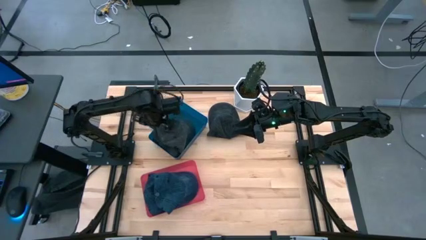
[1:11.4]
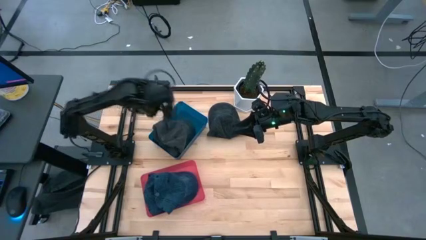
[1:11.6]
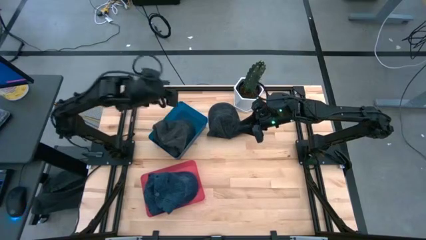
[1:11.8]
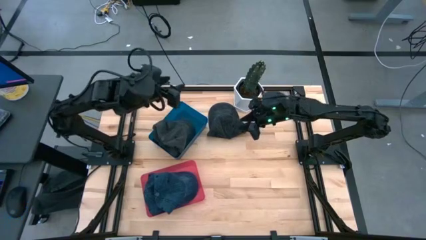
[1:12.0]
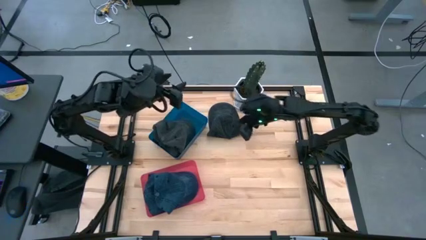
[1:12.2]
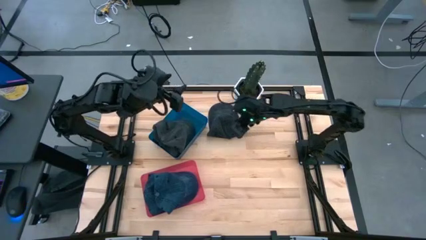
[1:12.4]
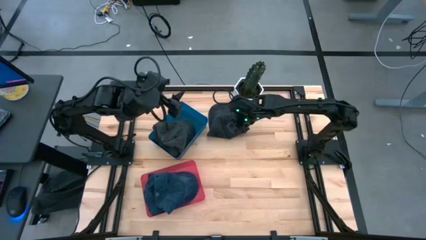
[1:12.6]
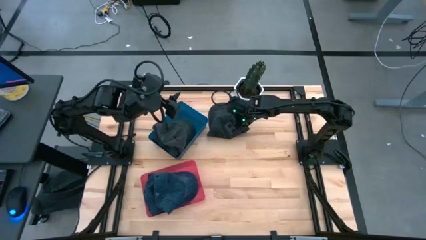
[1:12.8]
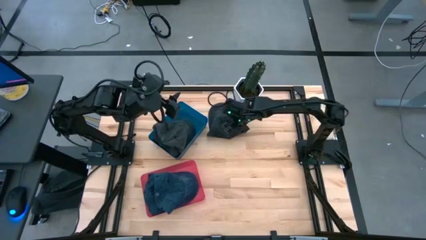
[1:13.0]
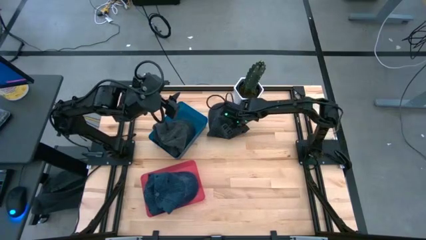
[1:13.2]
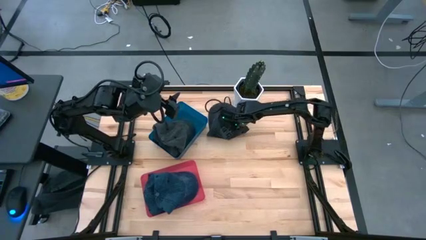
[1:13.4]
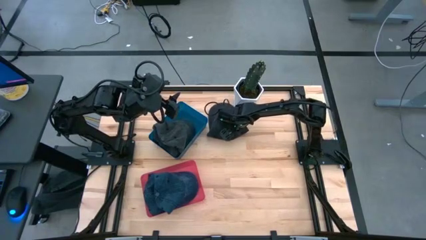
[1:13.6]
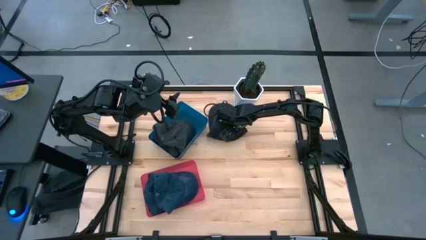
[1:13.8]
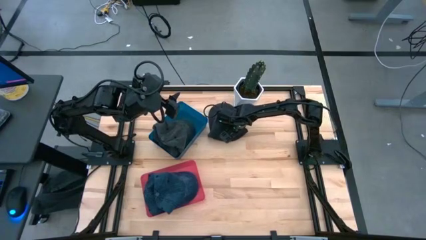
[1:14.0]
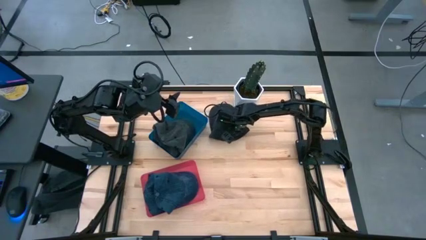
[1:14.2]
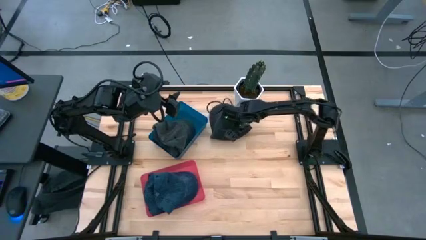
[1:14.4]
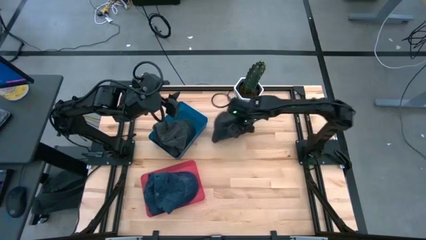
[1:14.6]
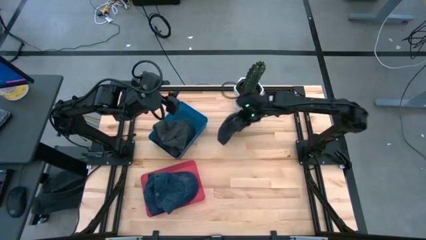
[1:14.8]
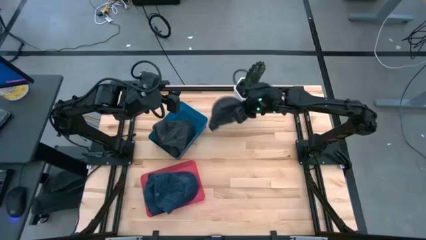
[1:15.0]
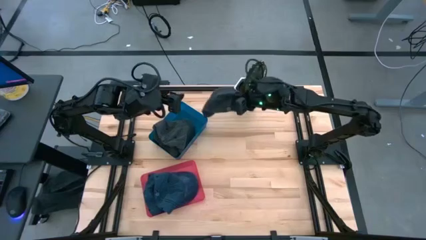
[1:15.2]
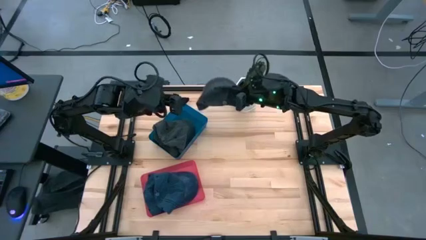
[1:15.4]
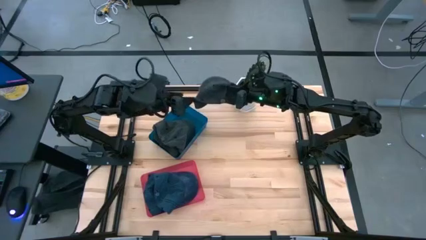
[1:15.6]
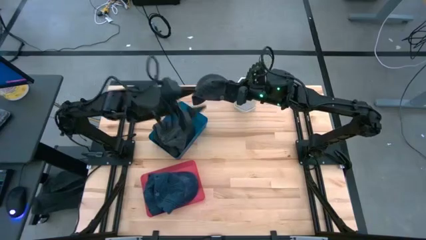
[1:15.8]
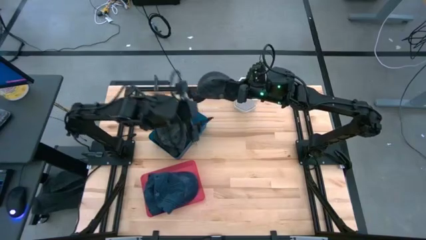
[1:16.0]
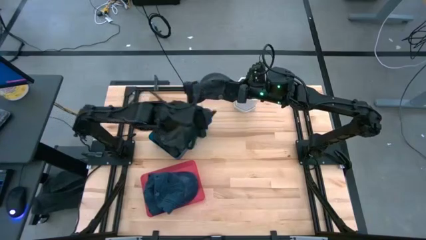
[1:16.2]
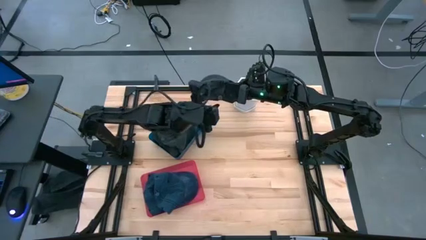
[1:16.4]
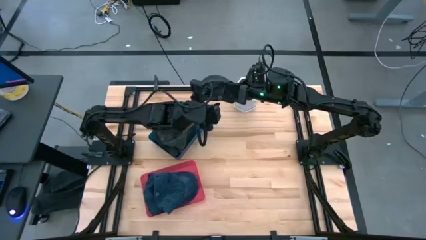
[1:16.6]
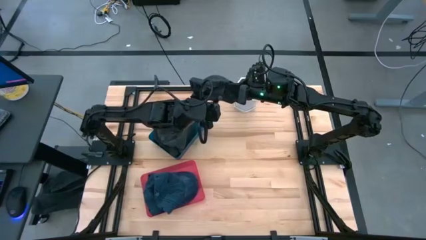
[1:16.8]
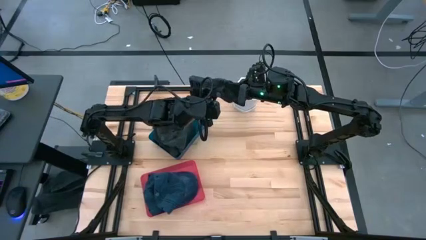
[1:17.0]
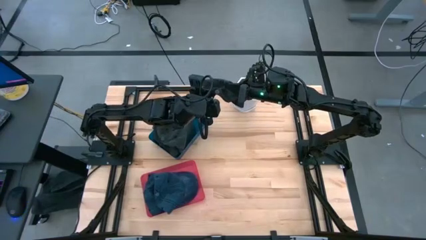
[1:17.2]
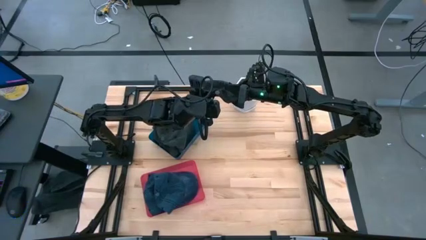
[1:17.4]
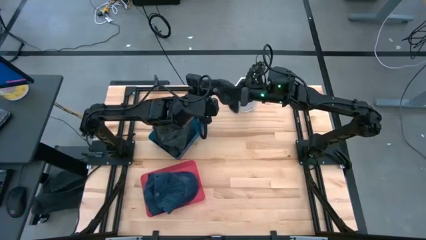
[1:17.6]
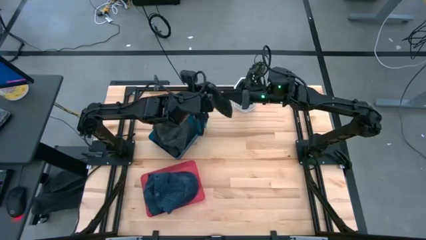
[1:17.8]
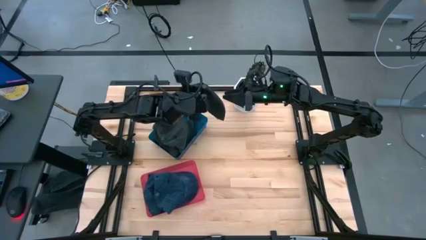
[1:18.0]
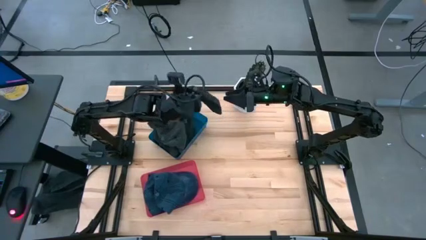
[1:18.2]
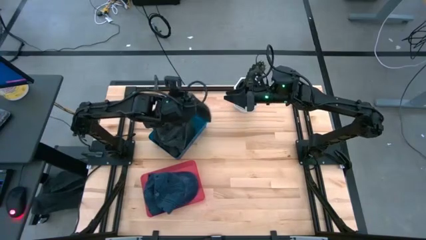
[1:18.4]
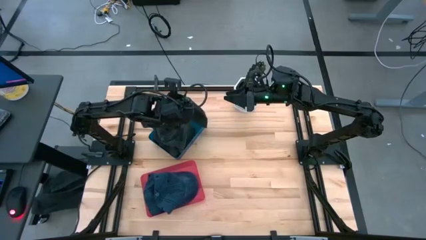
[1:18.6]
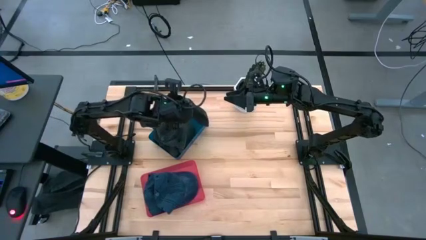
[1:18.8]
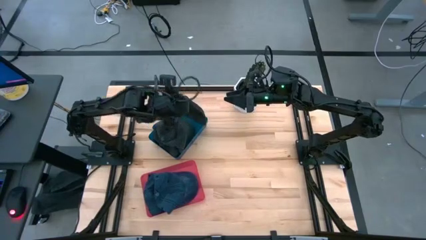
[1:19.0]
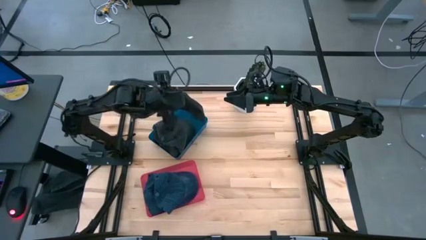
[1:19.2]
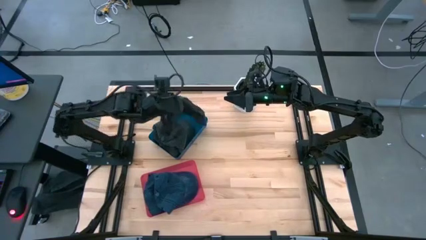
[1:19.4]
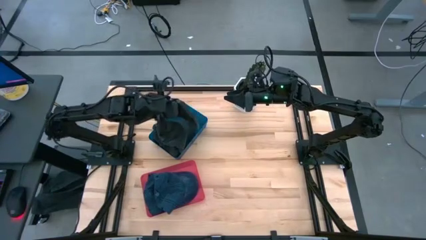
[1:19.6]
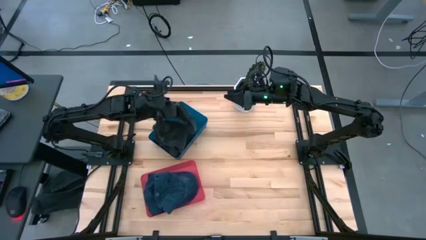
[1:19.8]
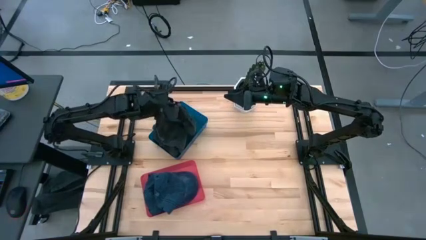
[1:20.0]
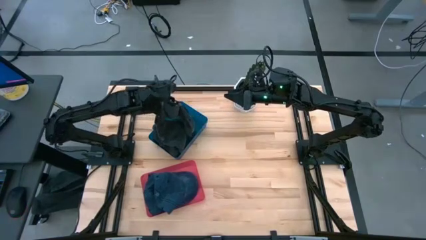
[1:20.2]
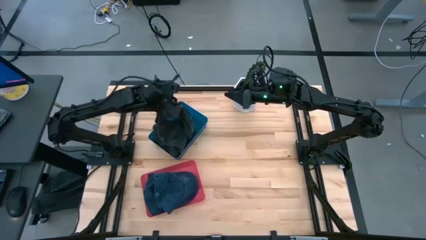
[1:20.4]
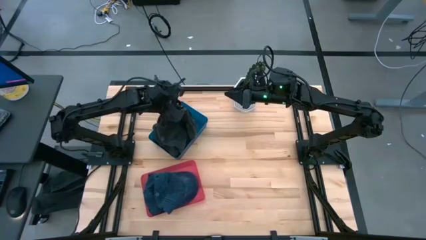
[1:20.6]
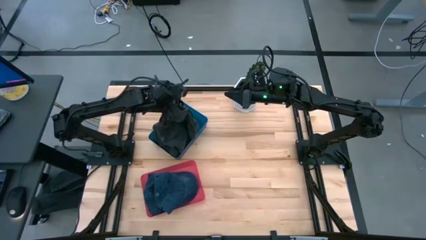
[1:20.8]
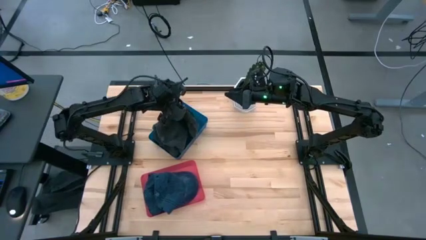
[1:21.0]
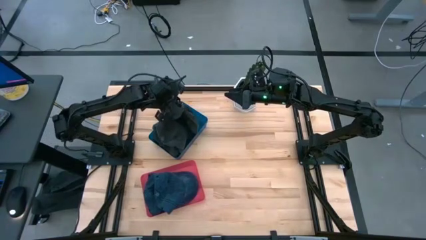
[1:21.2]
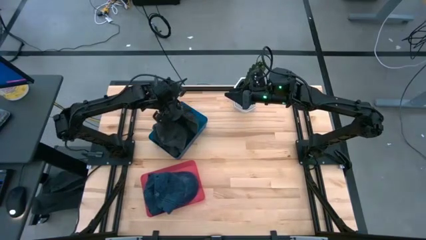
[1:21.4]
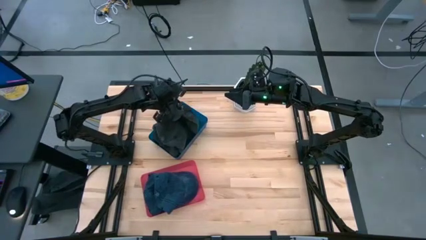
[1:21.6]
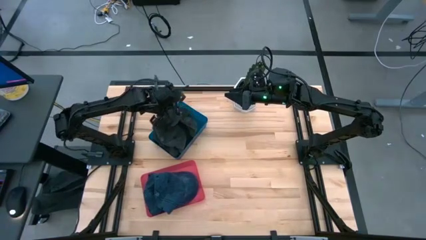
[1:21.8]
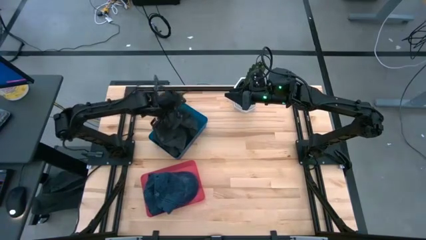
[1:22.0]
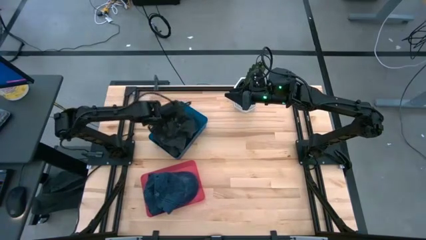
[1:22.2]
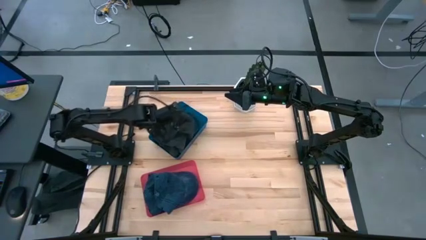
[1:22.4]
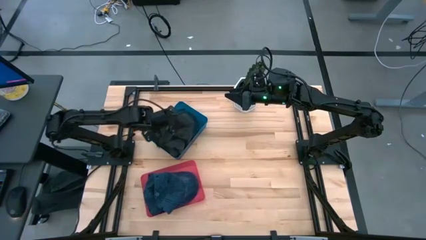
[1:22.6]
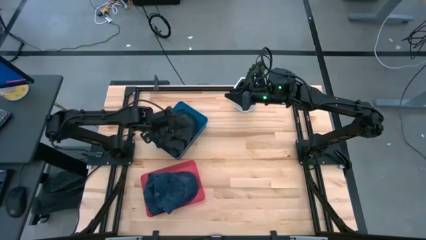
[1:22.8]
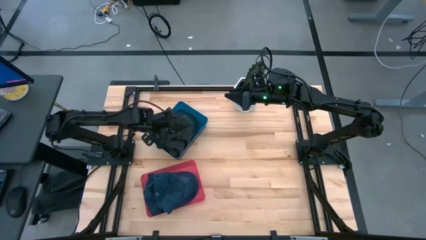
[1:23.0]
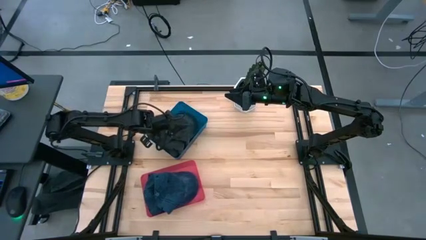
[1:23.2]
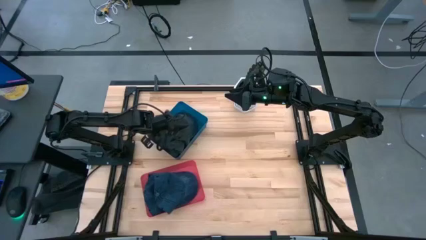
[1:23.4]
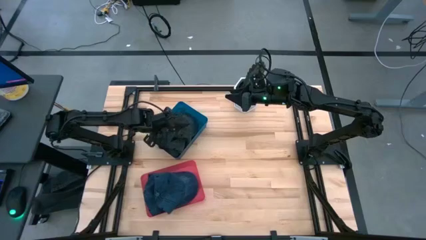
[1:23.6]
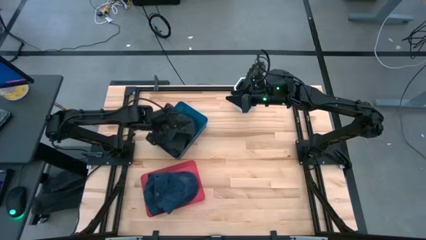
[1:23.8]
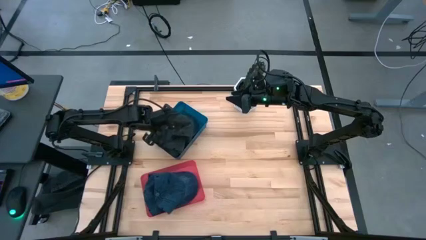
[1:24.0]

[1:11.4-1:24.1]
Task: Pick & Place hat
Put the black cap into the blue bin

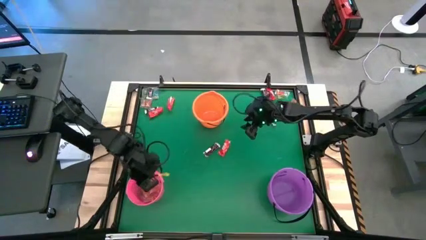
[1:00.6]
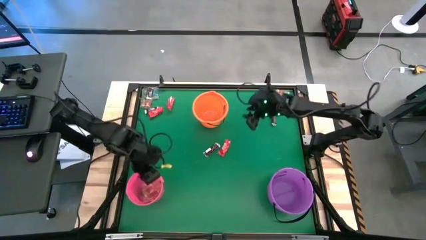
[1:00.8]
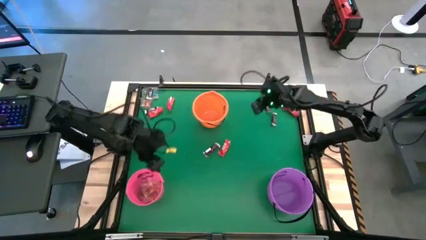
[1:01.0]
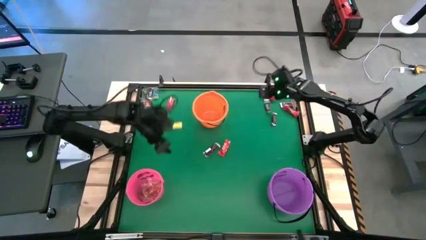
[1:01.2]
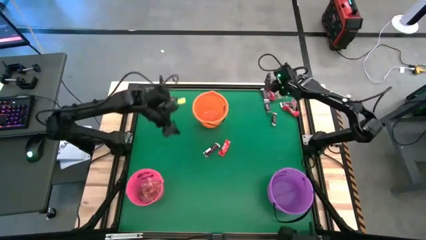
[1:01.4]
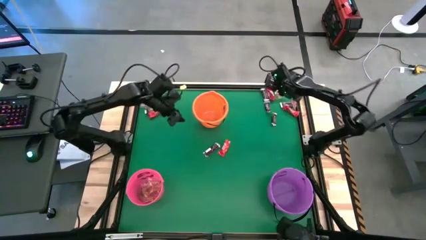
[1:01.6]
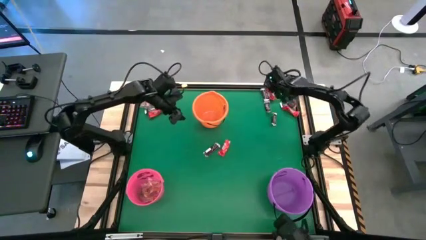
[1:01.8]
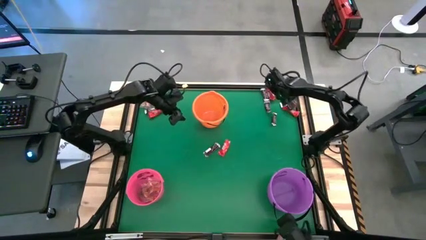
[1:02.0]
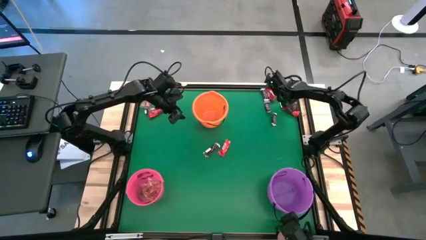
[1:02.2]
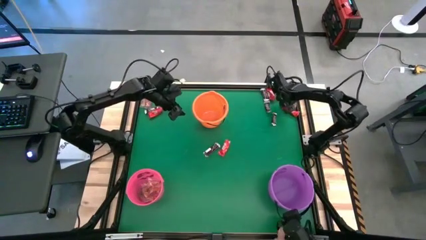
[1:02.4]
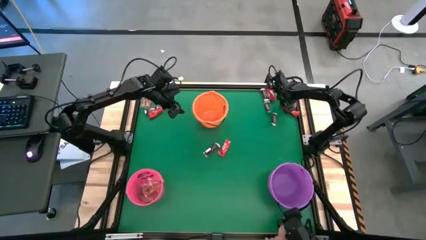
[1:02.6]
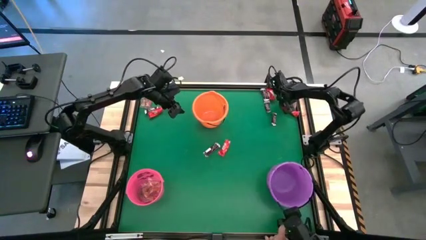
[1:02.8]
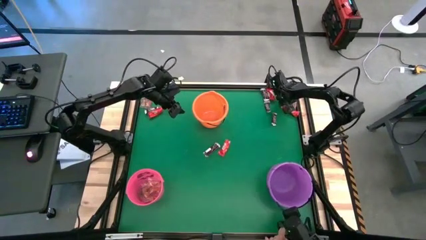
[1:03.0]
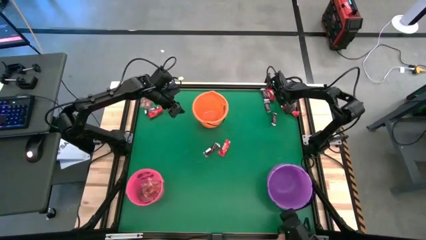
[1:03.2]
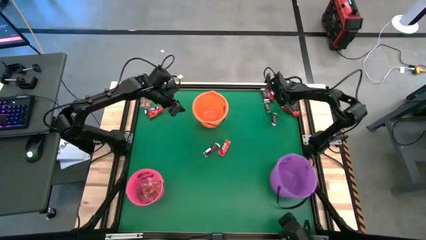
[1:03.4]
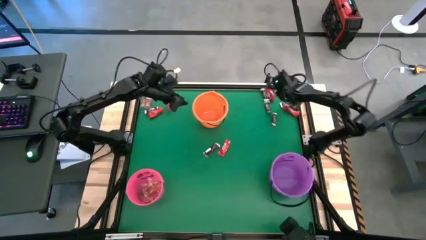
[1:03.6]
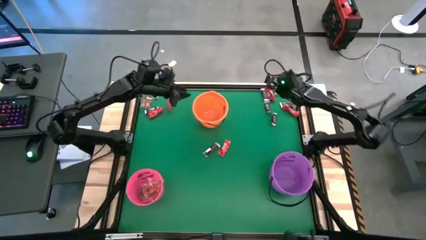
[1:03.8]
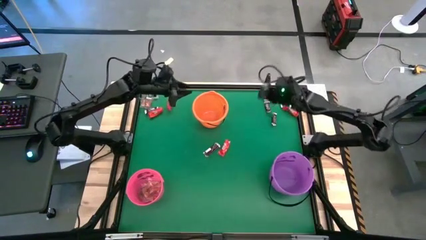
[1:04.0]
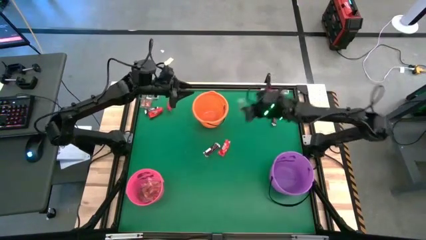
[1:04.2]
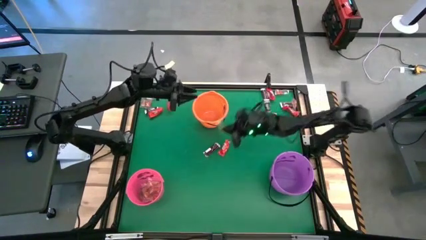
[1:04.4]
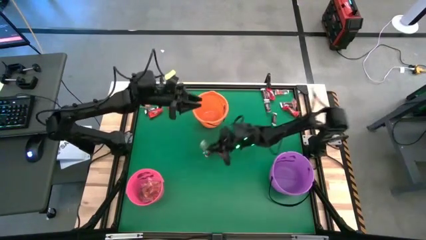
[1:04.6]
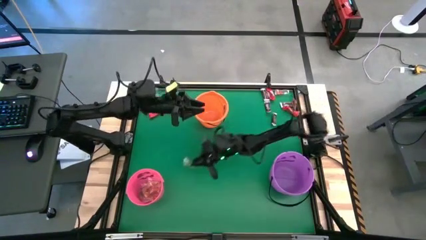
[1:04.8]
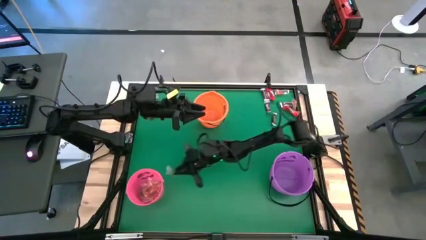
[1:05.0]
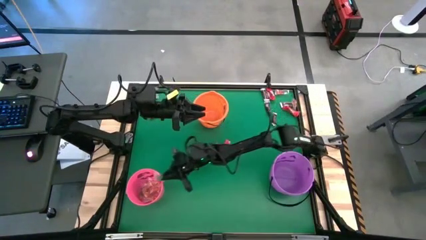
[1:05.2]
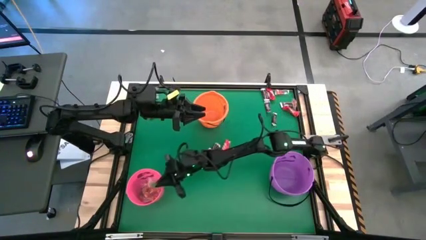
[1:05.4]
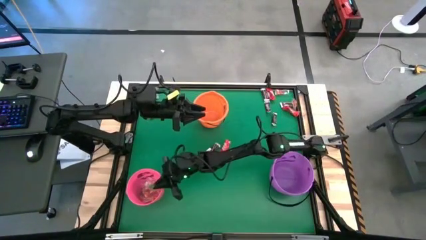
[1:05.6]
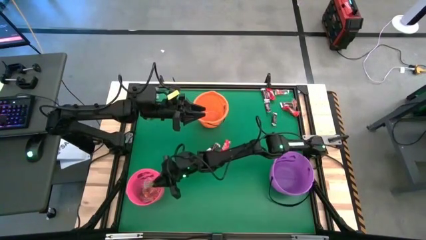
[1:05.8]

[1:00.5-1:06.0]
Task: Sort candy by brand, put in halloween buckets
Put the green gummy into the pink bucket
